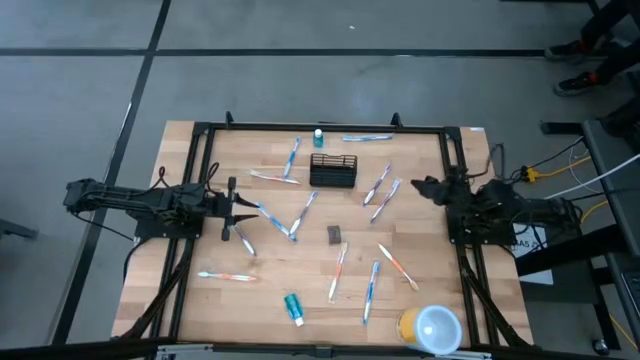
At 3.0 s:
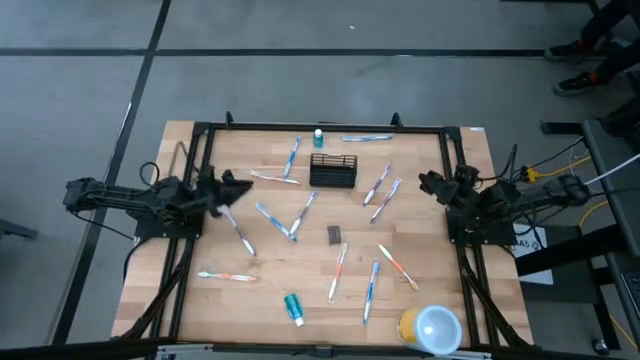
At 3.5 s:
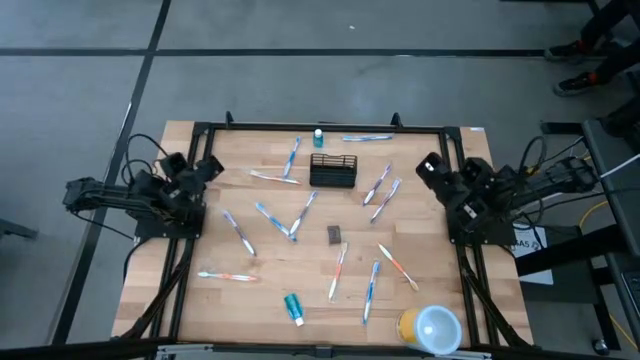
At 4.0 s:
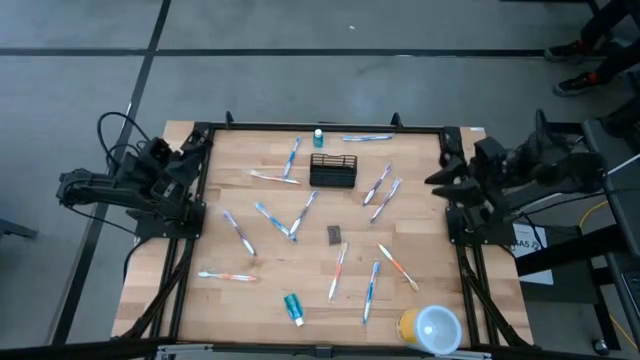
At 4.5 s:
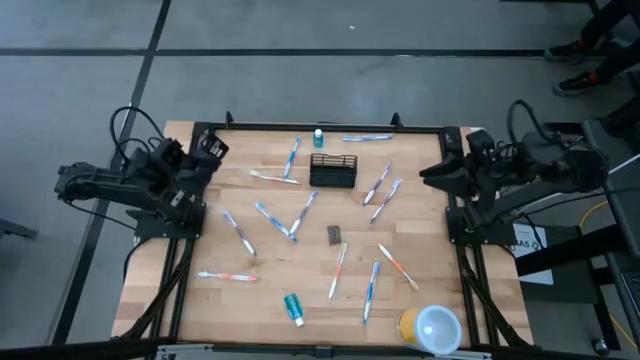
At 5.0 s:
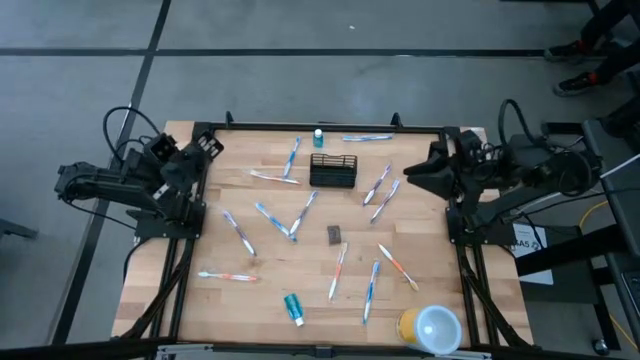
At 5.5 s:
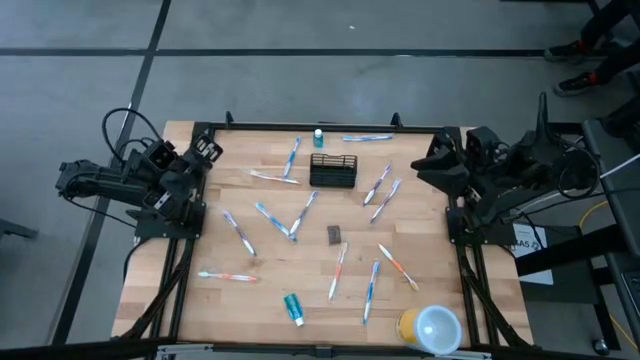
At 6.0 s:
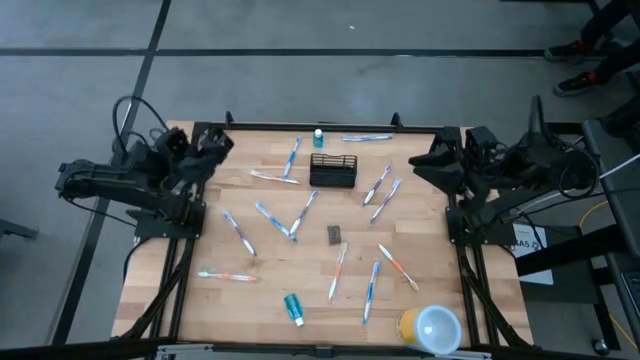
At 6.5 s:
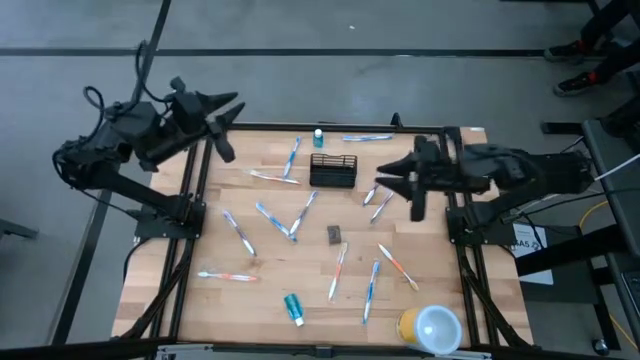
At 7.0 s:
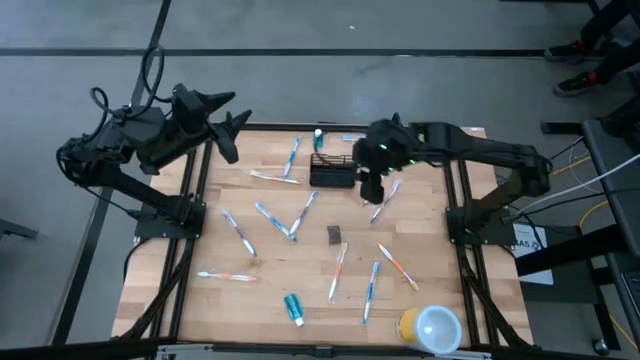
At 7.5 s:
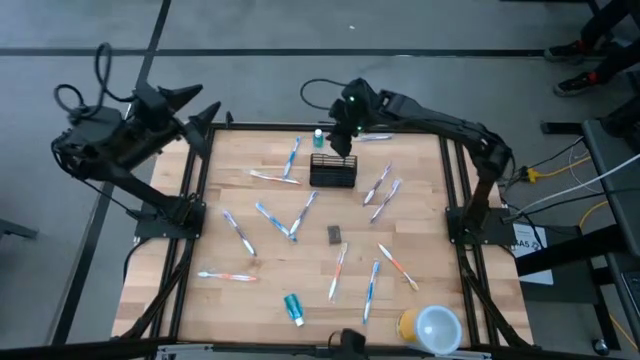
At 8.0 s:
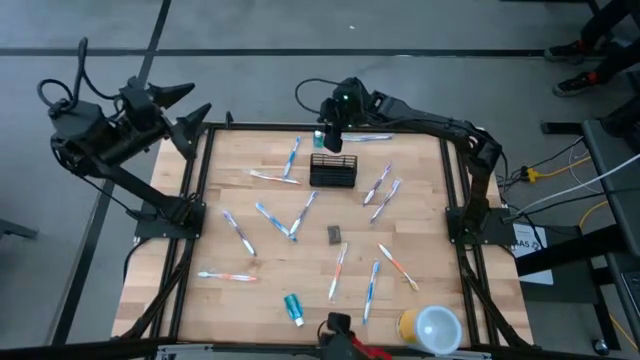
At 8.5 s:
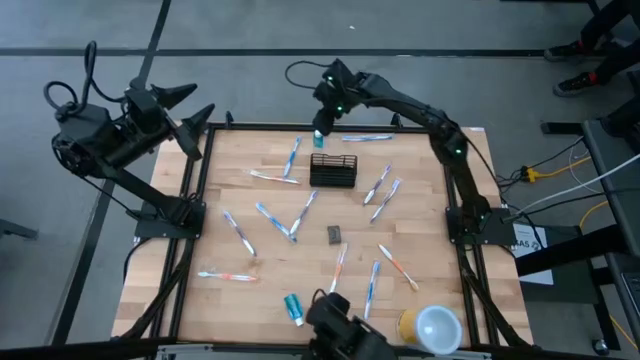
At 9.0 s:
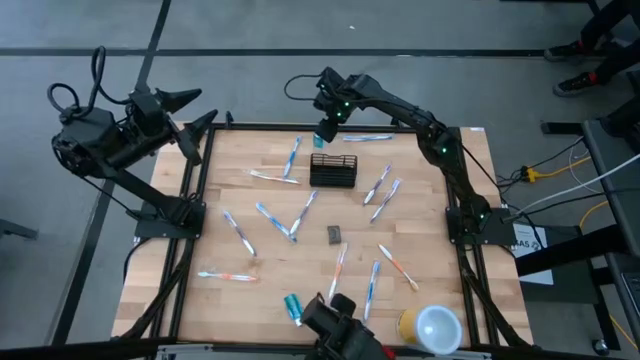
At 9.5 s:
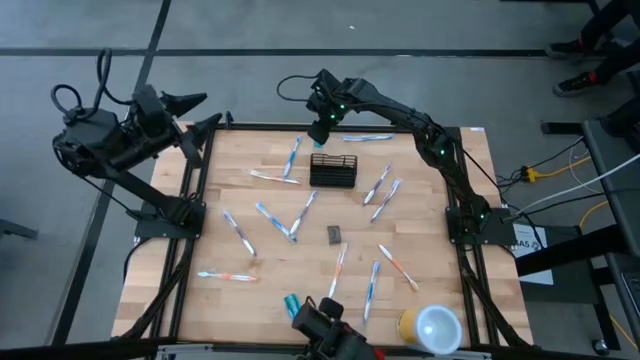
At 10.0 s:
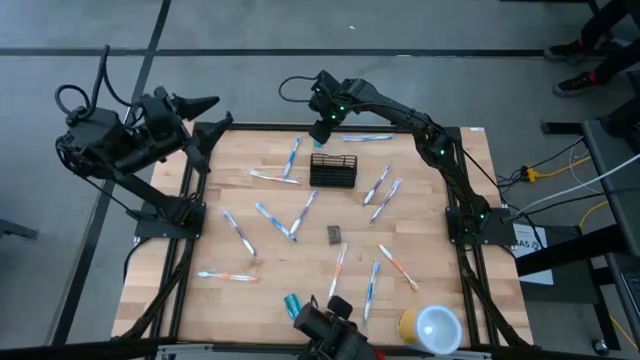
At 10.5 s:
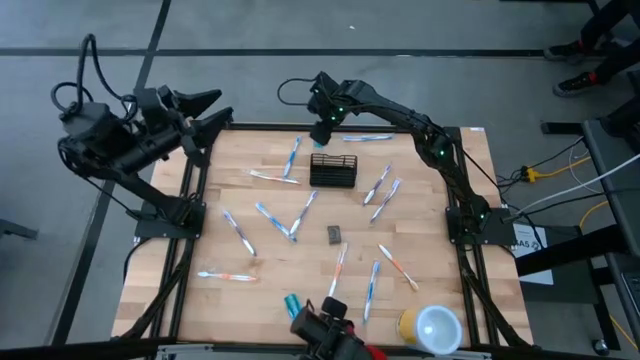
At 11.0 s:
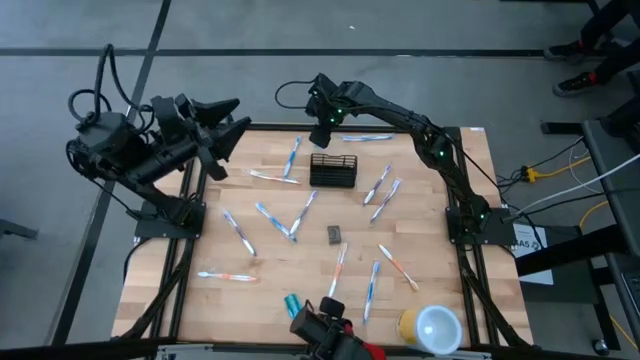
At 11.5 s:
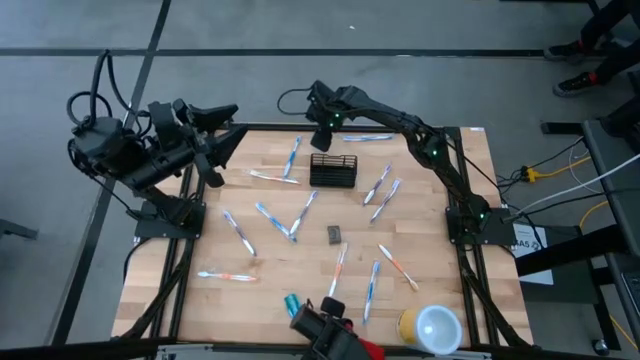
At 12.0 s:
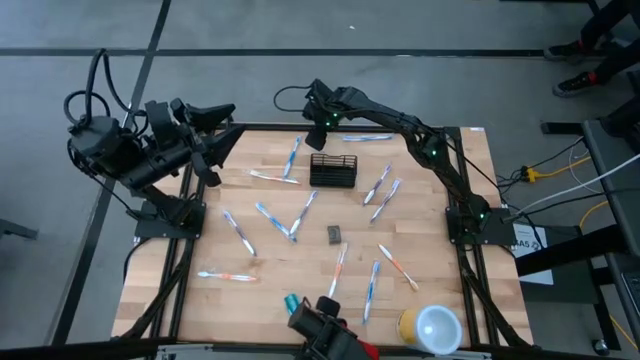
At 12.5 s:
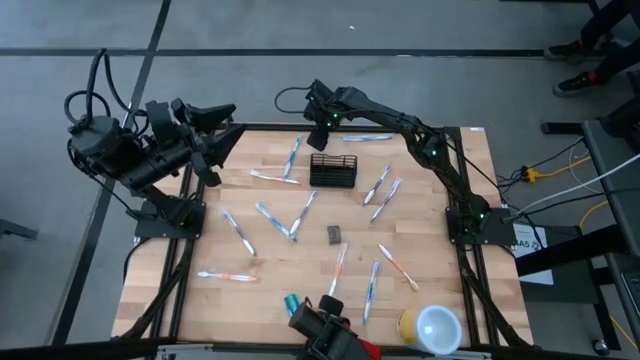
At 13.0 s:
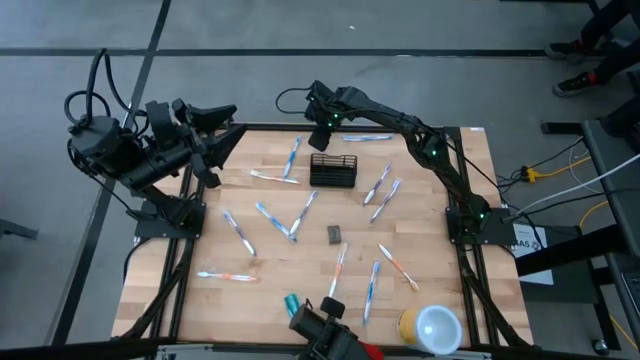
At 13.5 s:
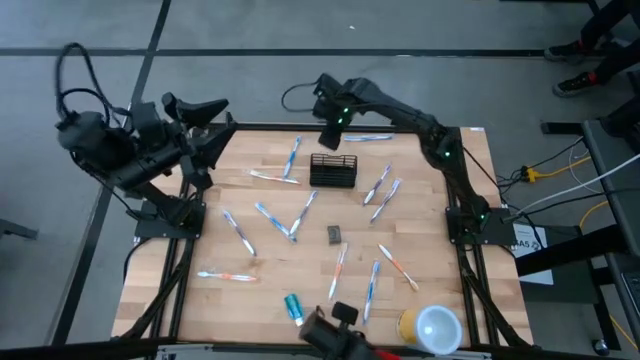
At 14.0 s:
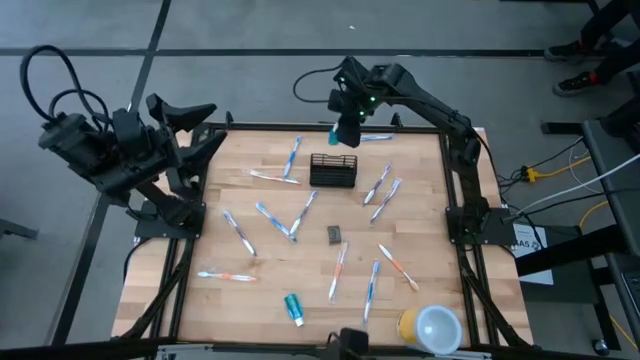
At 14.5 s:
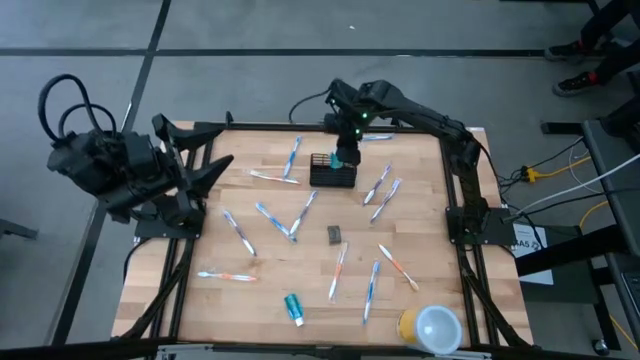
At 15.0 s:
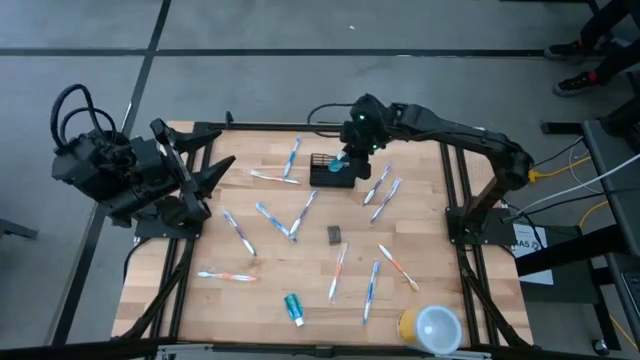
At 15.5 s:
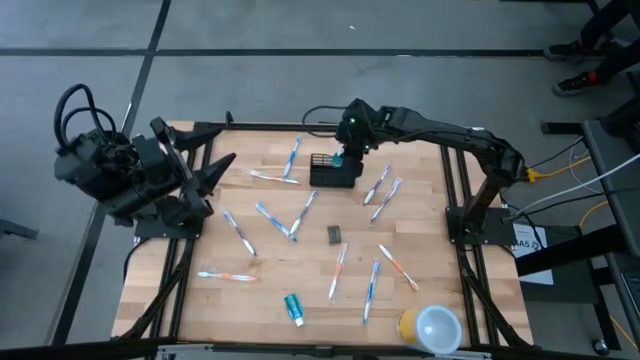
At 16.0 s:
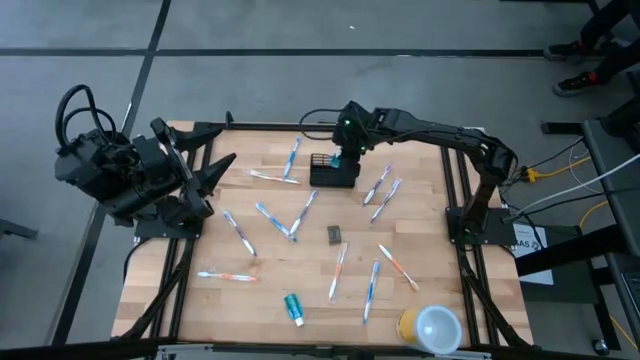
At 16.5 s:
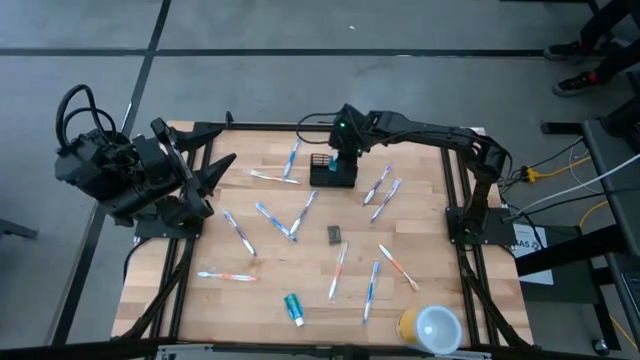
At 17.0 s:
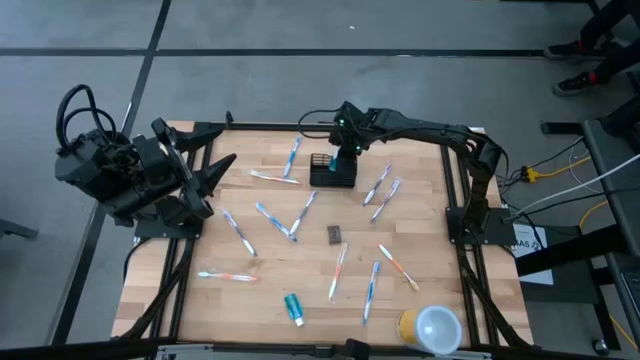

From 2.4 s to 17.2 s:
Task: Pick & Place toothbrushing station
Put the top mouthwash into the middle section of the mesh organizer

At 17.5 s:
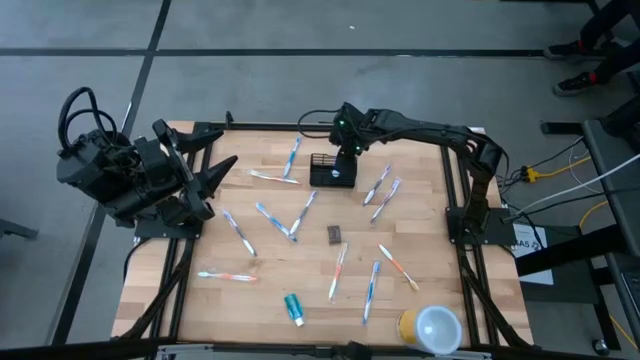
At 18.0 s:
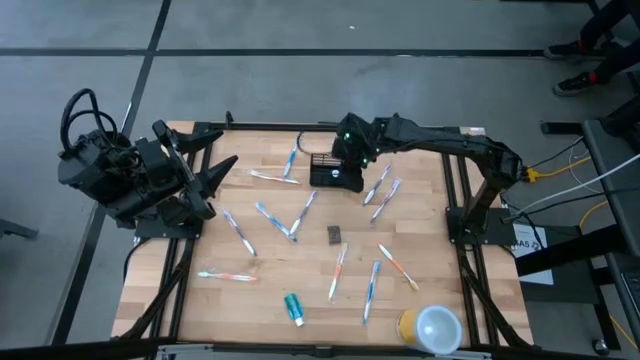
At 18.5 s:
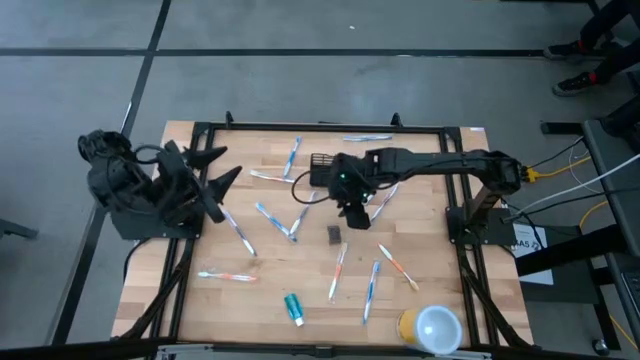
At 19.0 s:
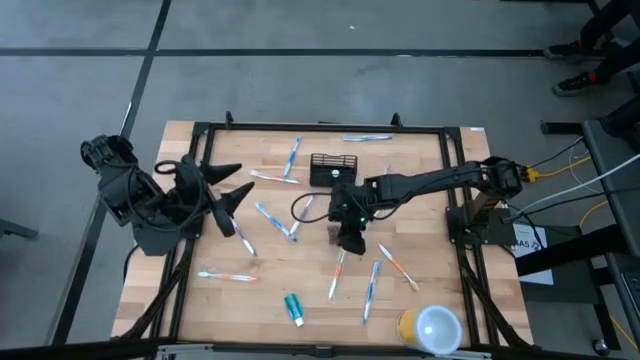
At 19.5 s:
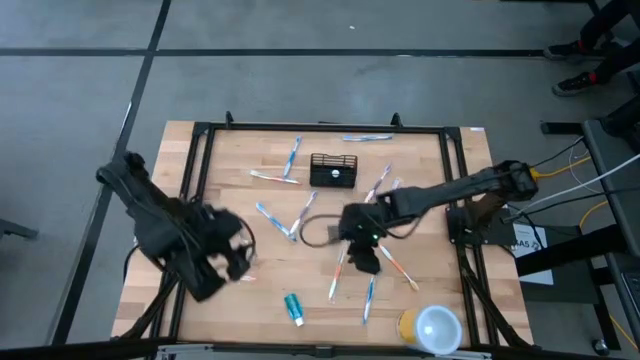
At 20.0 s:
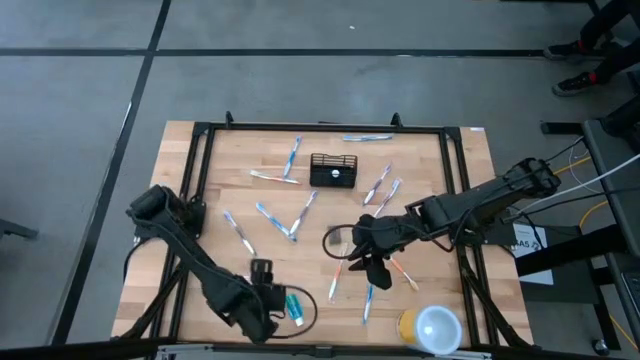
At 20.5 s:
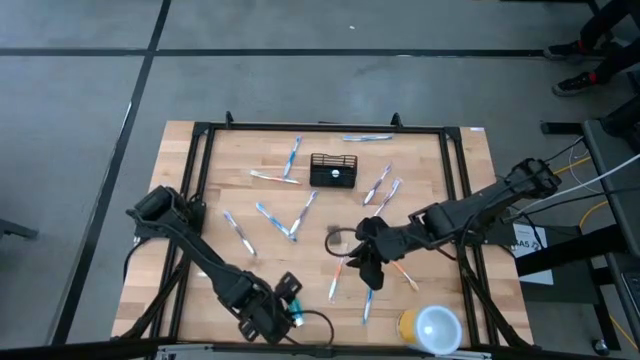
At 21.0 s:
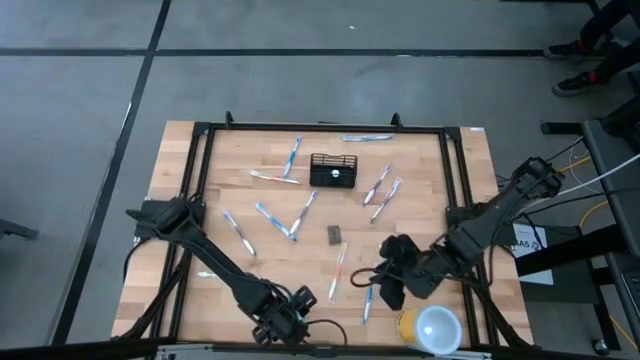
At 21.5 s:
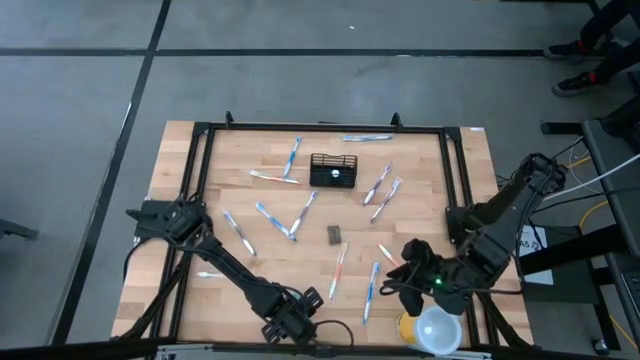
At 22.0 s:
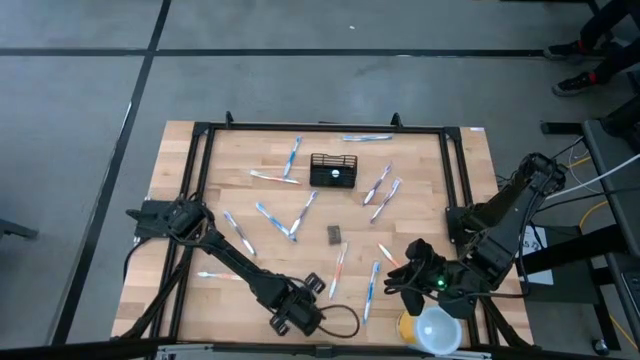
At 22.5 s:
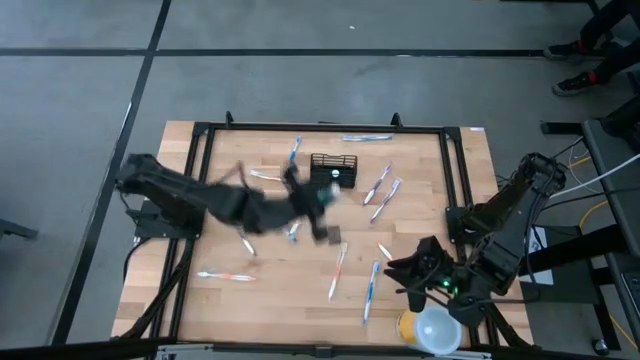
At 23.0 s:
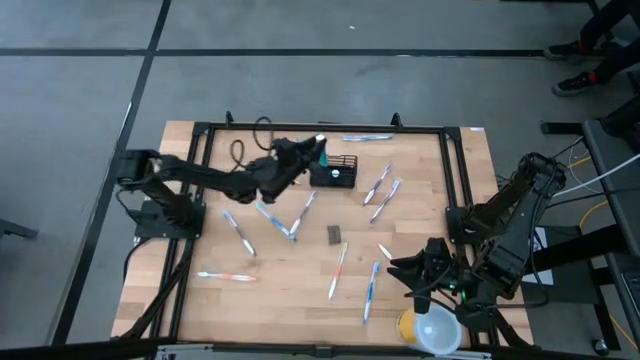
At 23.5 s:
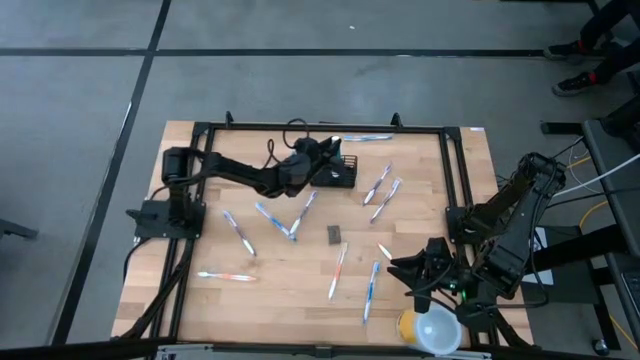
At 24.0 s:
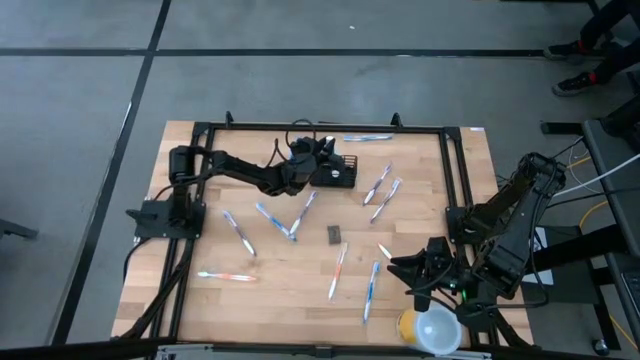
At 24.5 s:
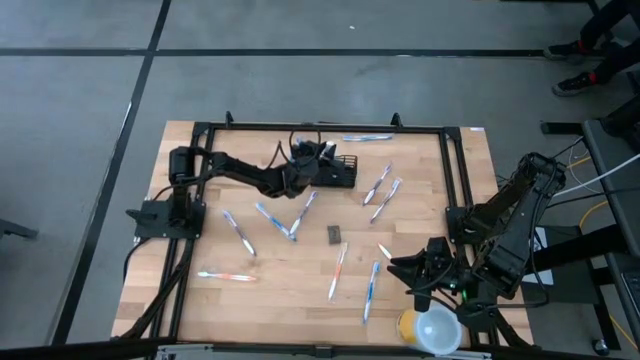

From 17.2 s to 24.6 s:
Put the mouthwash into the middle section of the mesh organizer
